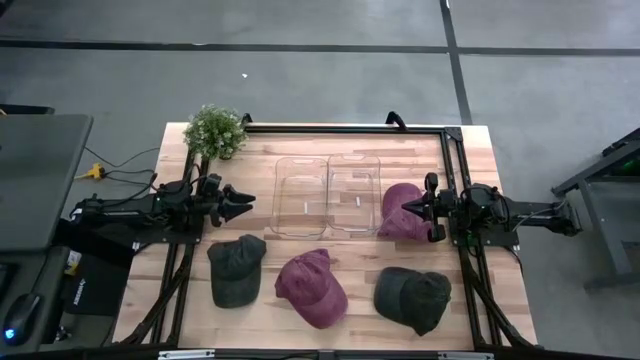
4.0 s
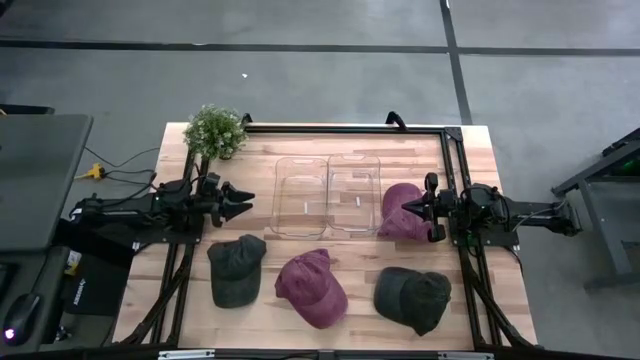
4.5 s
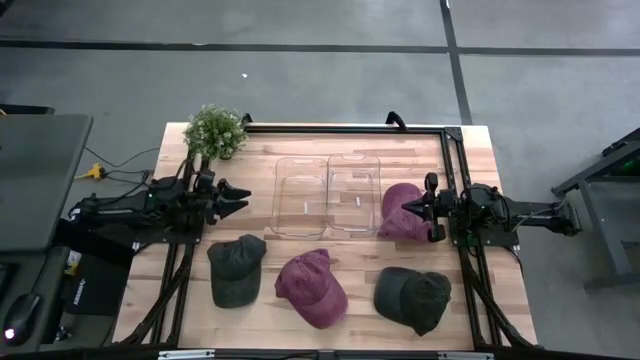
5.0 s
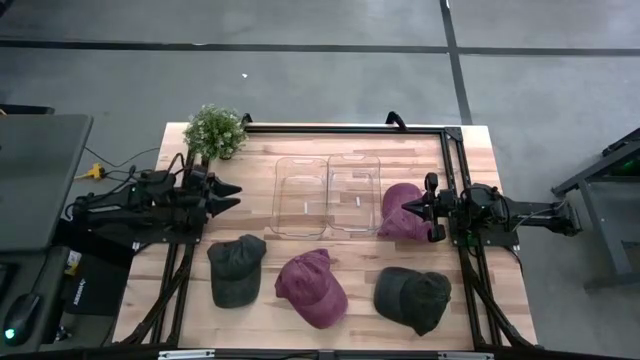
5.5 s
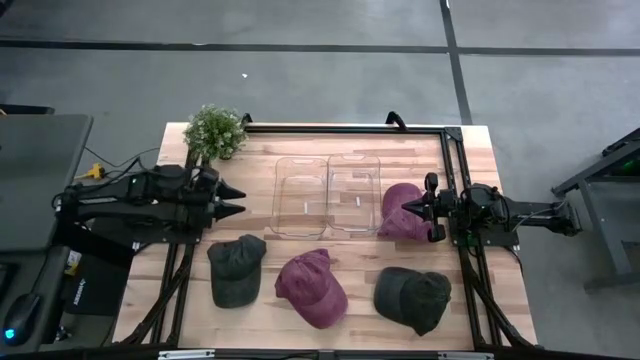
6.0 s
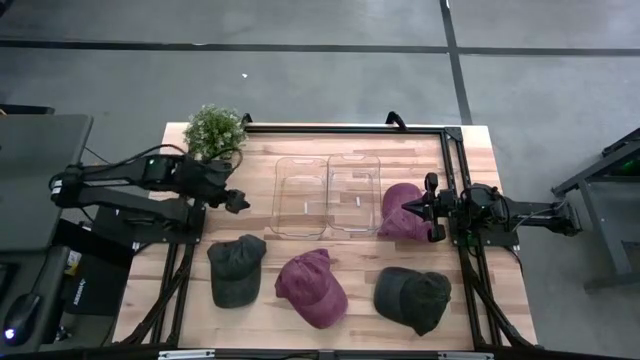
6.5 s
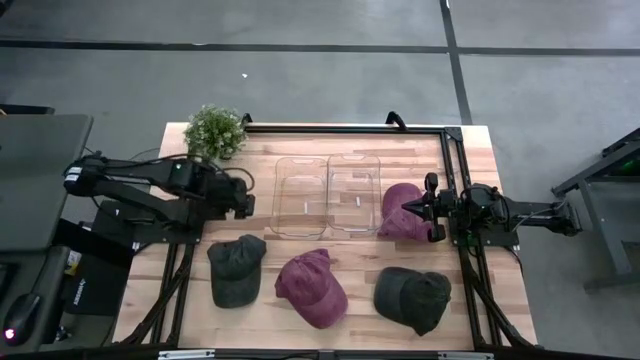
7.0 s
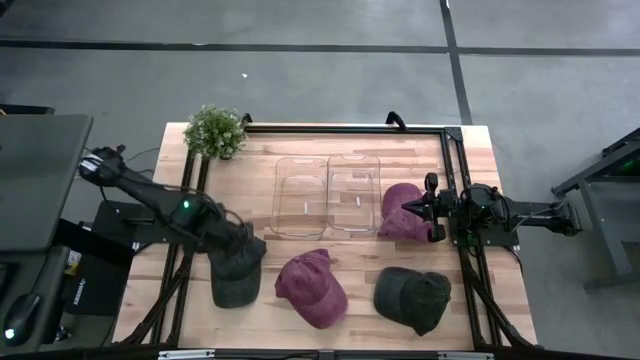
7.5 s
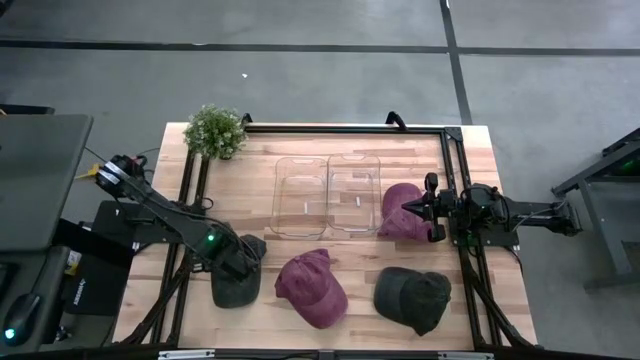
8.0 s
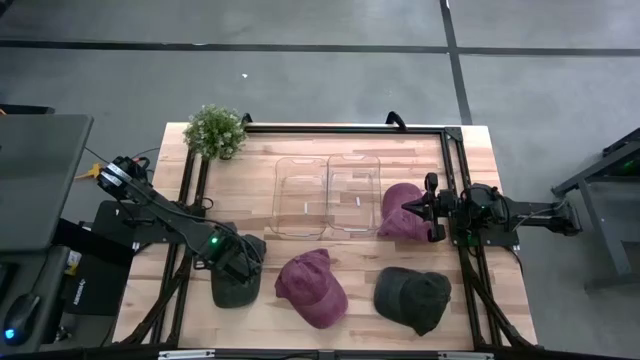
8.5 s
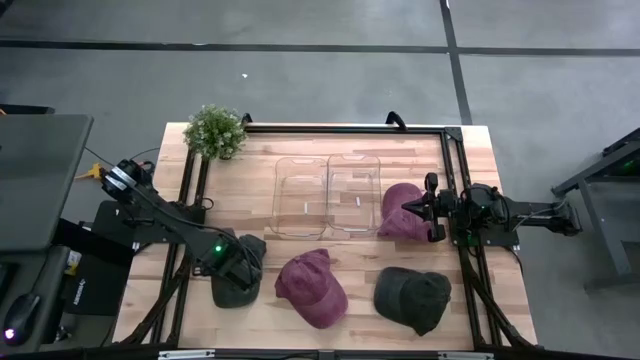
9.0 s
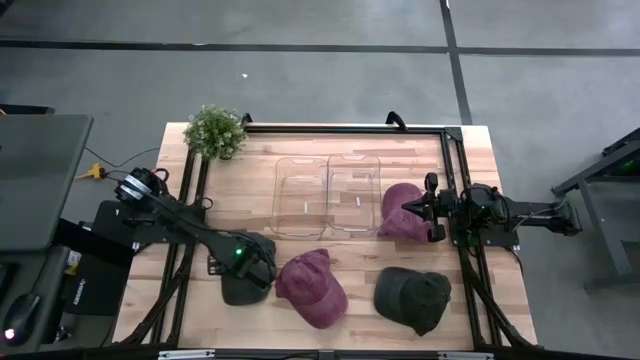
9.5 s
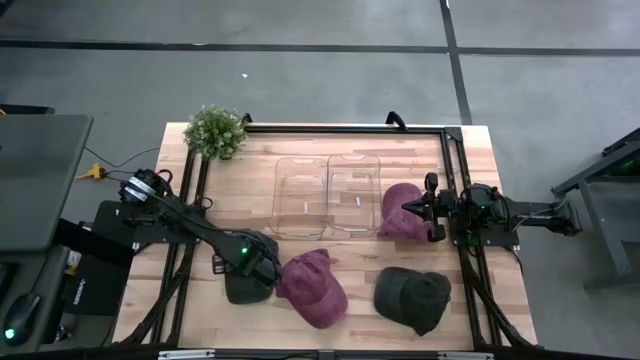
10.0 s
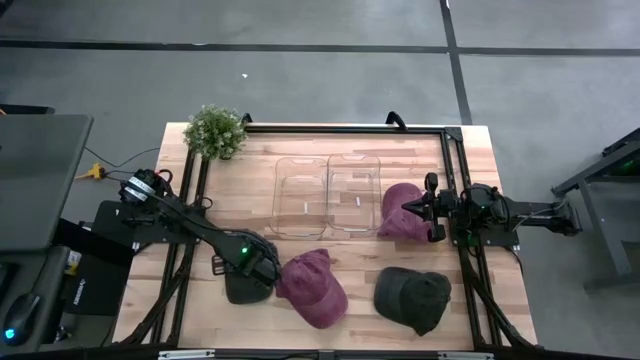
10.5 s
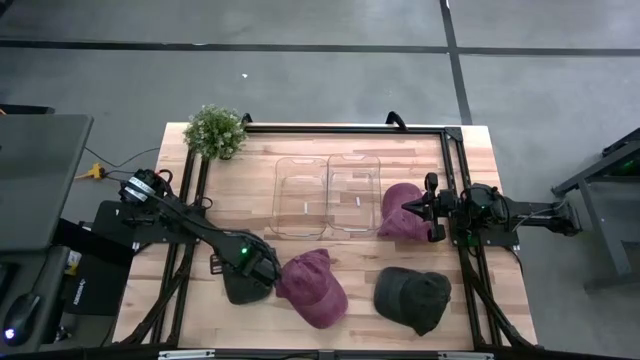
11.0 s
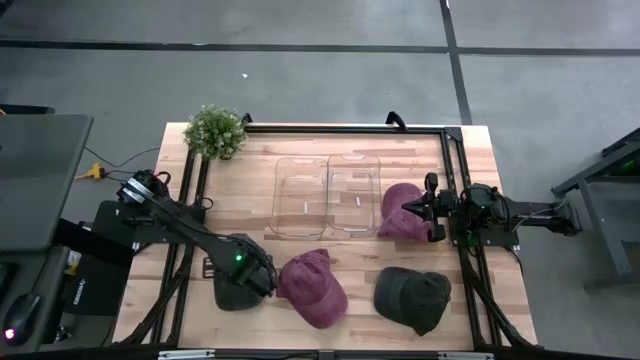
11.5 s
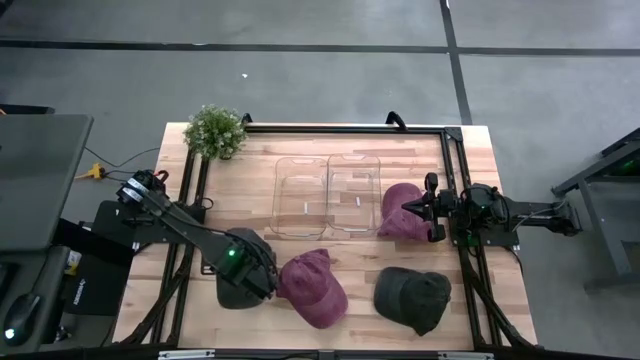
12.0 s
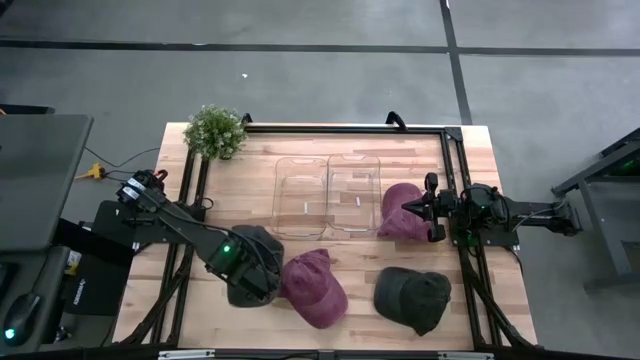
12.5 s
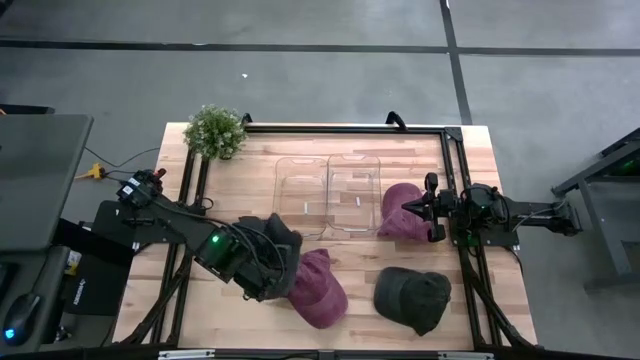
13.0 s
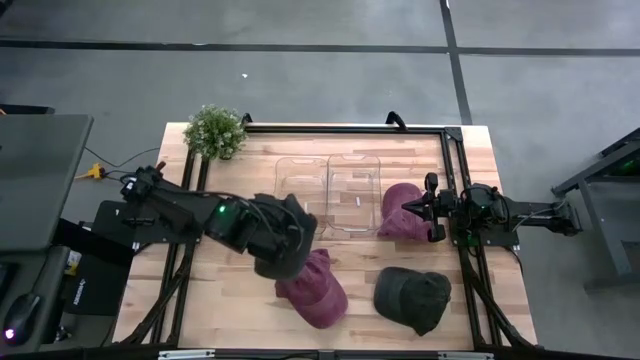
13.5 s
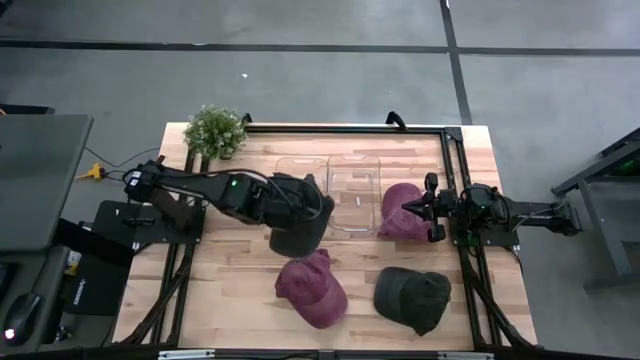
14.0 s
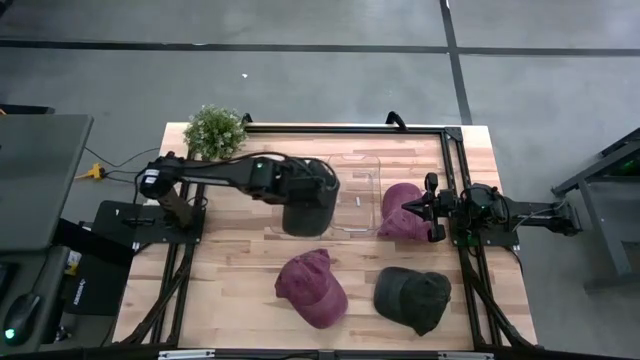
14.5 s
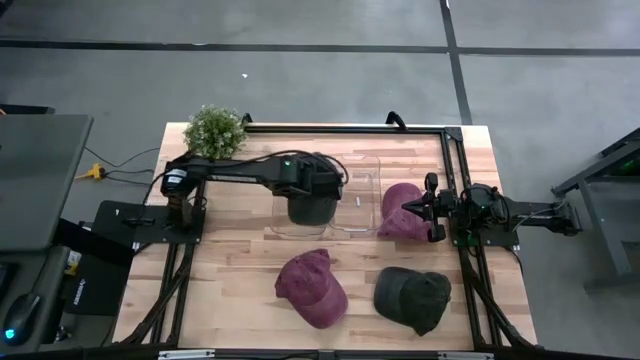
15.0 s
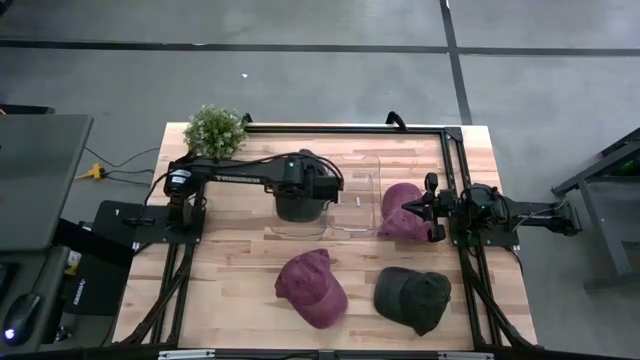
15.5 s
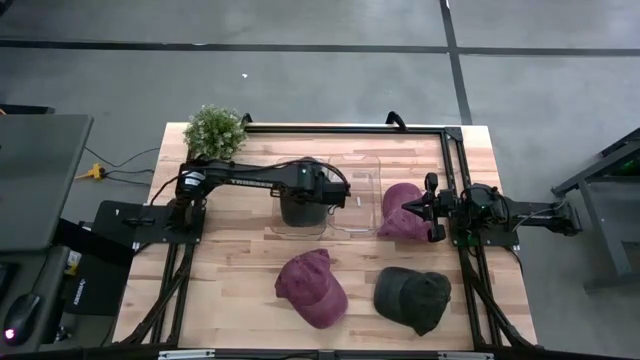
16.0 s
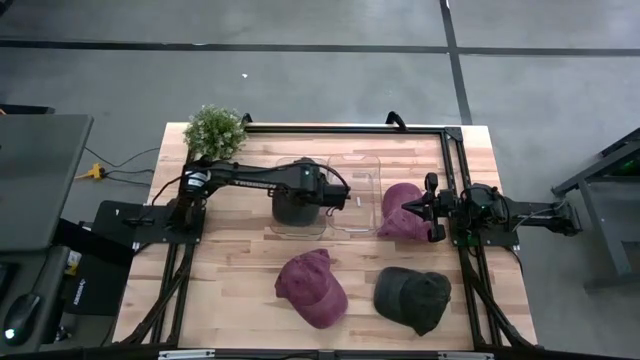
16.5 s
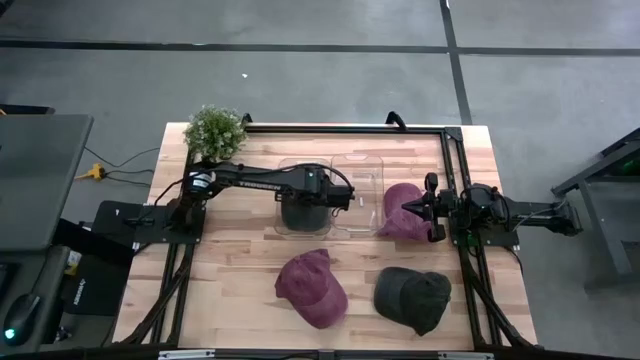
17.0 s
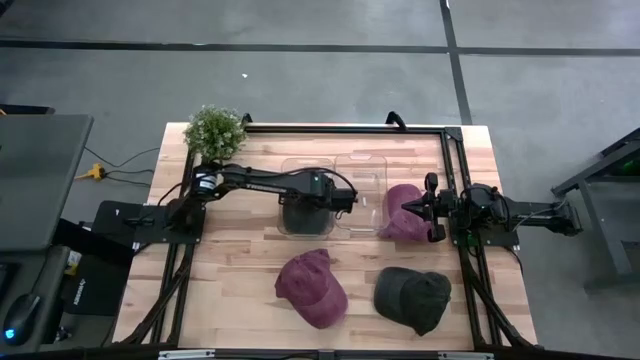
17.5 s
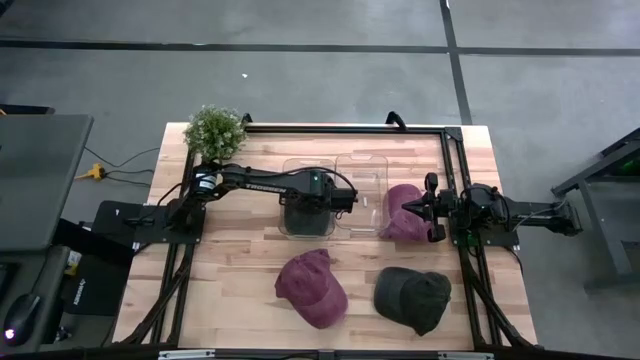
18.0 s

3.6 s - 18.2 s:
Task: Pick & Place hat
Put the left black cap into the left transparent bin

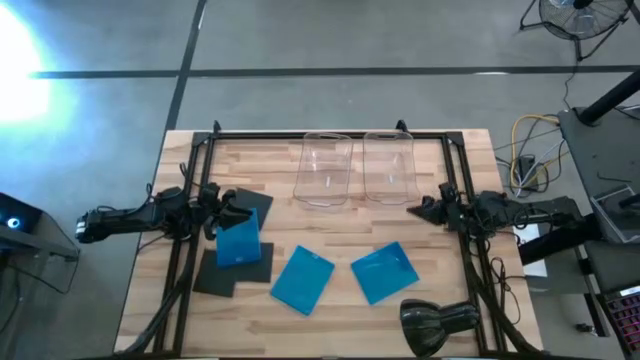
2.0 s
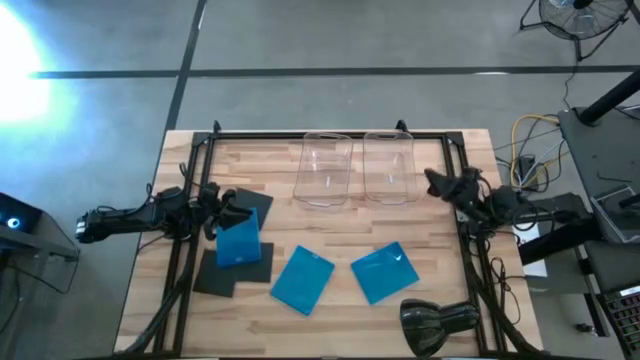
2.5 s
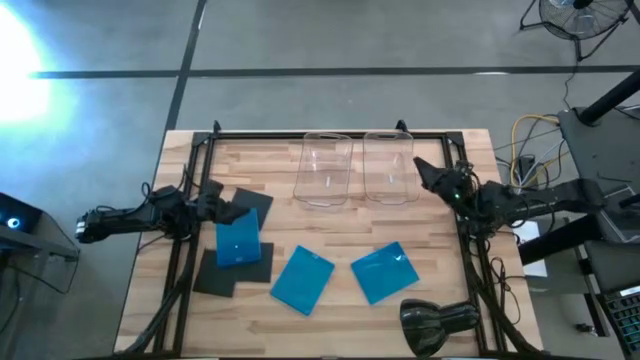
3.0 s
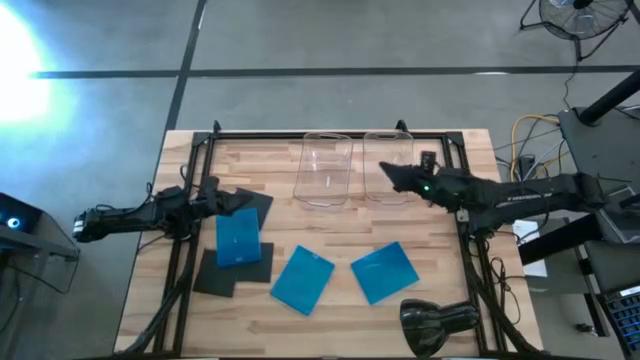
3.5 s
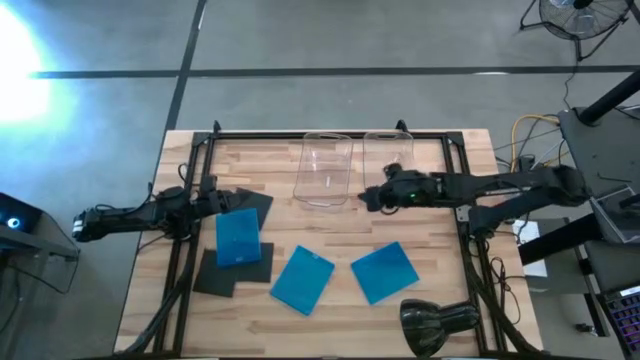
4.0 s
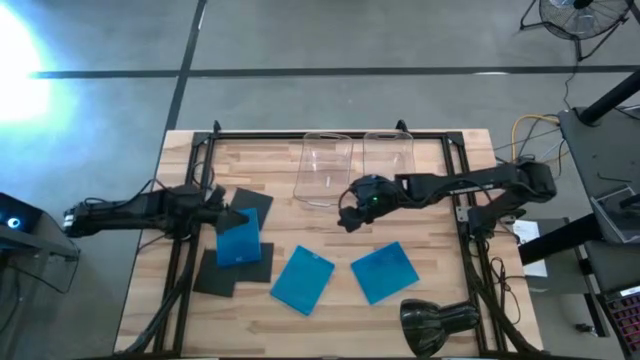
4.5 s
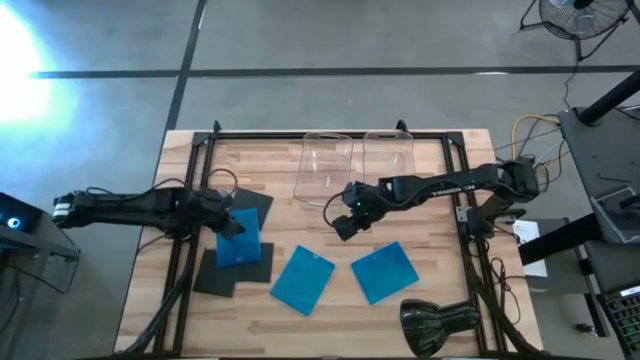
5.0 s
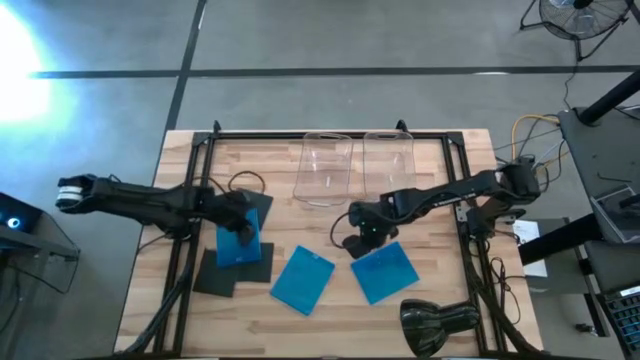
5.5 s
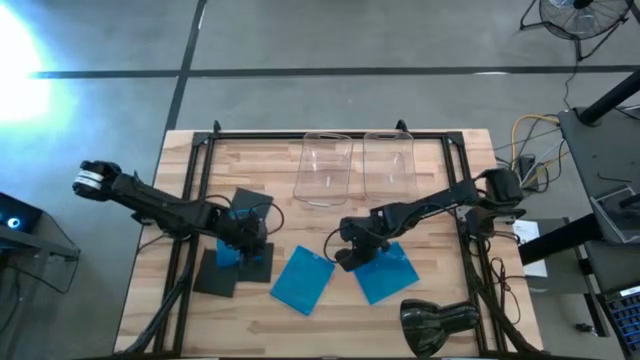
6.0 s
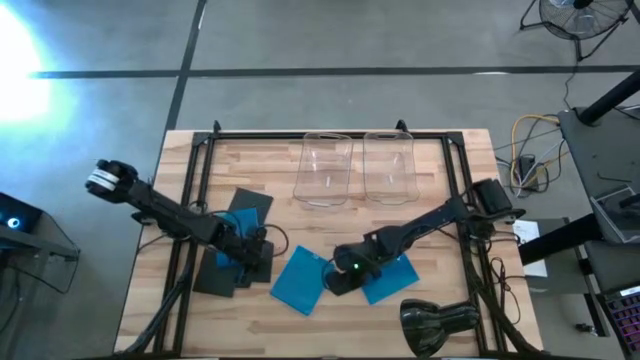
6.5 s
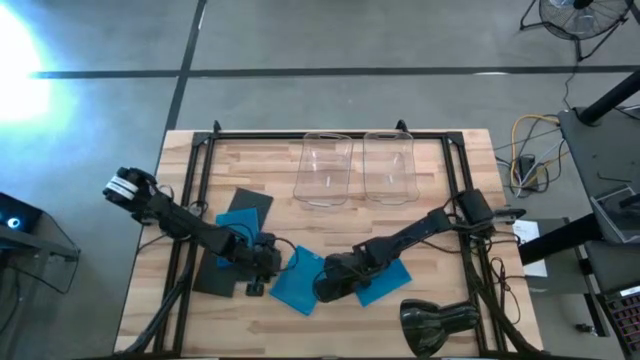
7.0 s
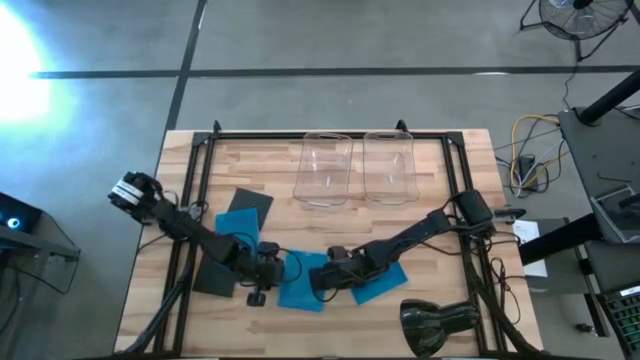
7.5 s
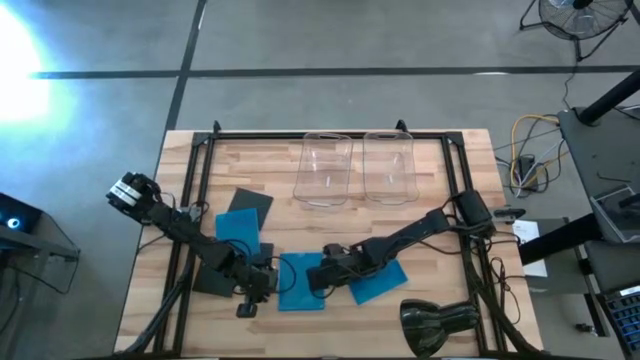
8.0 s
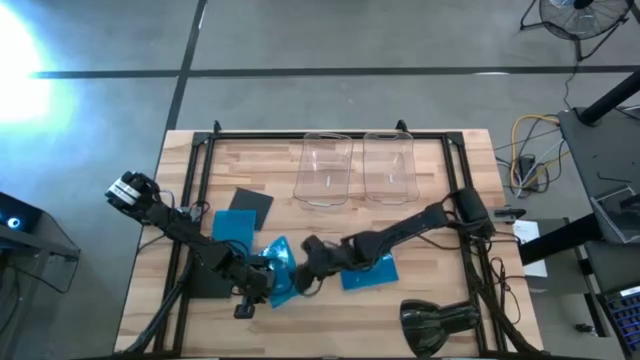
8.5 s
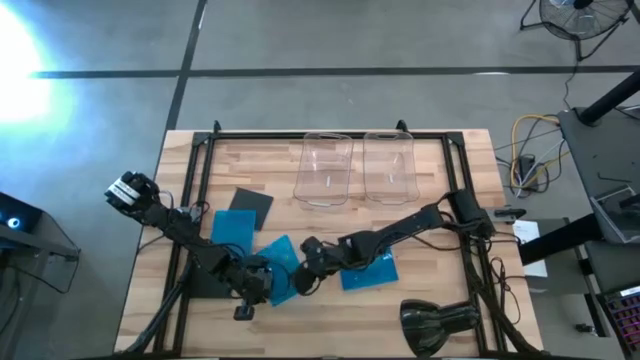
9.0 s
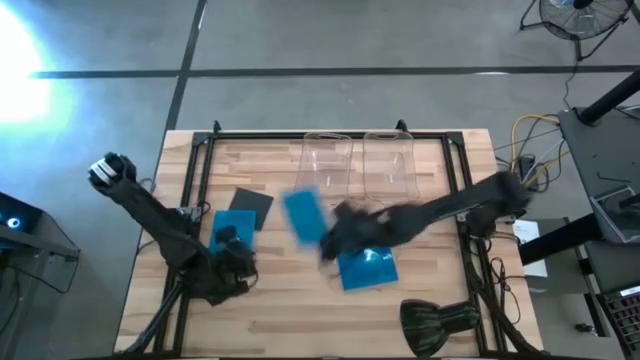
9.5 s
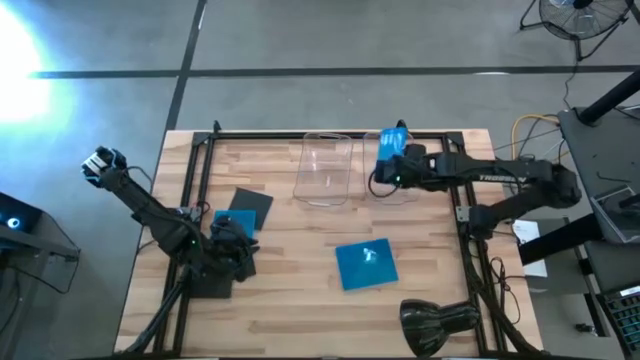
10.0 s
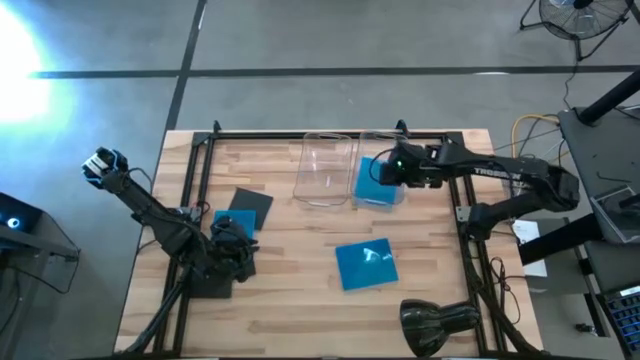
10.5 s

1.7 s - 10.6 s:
Task: Pick & place jewel cases by type
Put the middle blue CD case into the right transparent bin
